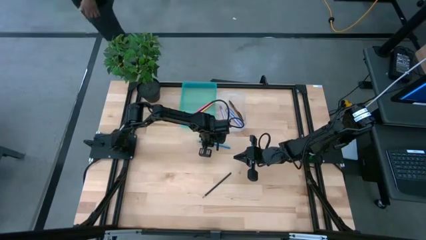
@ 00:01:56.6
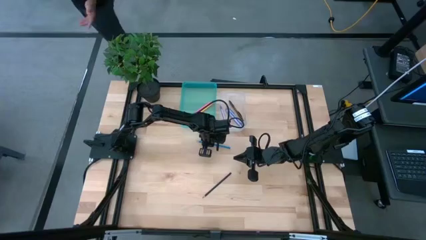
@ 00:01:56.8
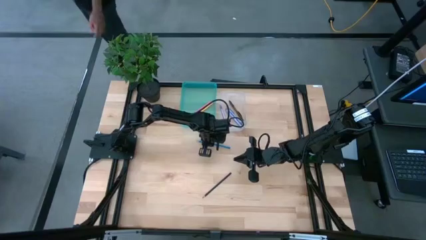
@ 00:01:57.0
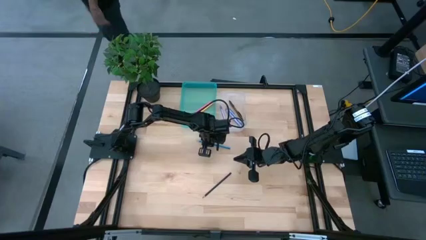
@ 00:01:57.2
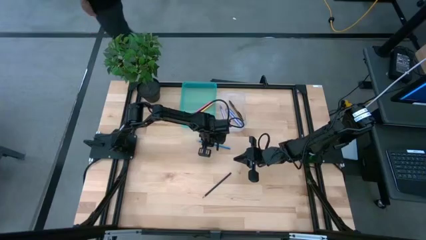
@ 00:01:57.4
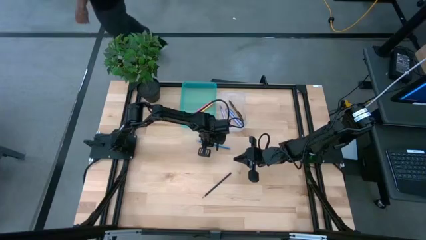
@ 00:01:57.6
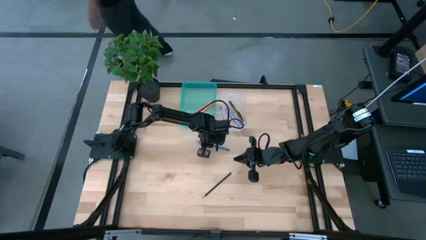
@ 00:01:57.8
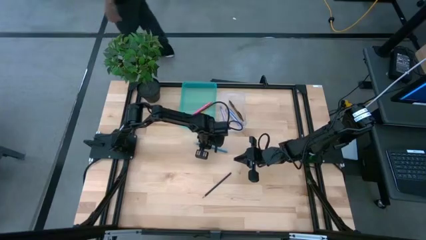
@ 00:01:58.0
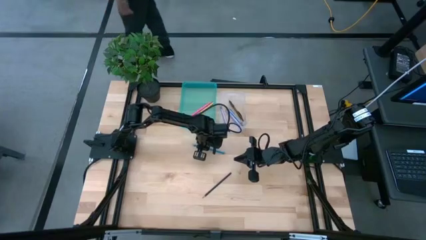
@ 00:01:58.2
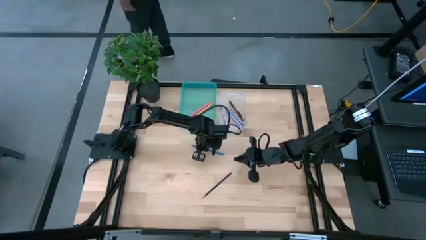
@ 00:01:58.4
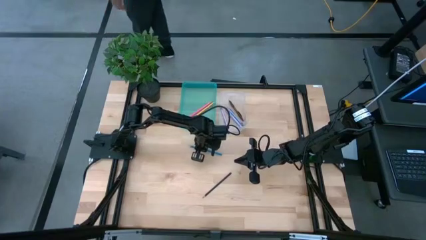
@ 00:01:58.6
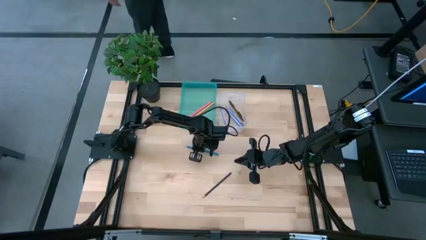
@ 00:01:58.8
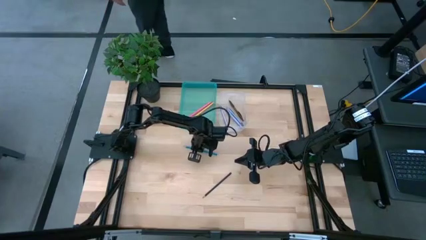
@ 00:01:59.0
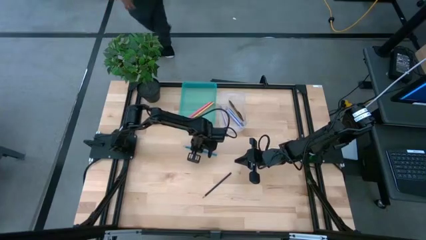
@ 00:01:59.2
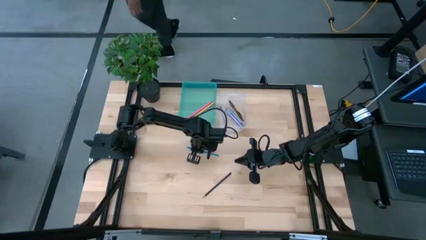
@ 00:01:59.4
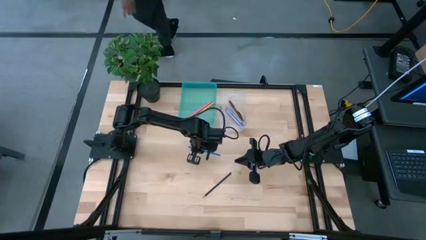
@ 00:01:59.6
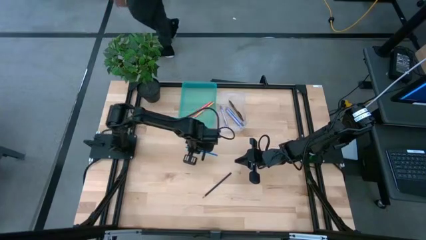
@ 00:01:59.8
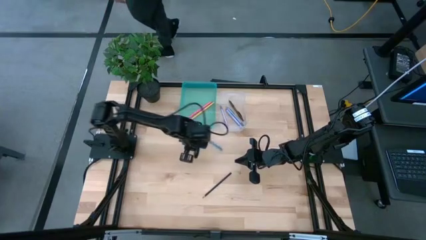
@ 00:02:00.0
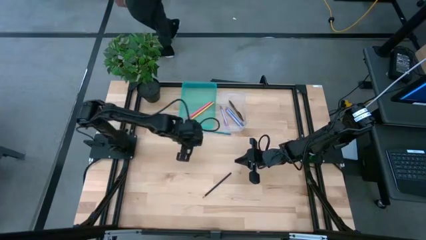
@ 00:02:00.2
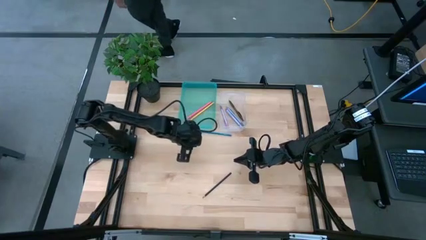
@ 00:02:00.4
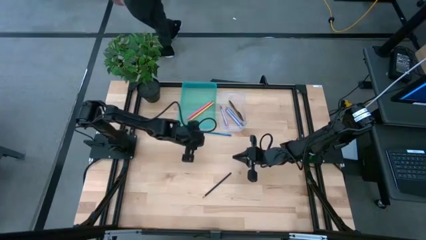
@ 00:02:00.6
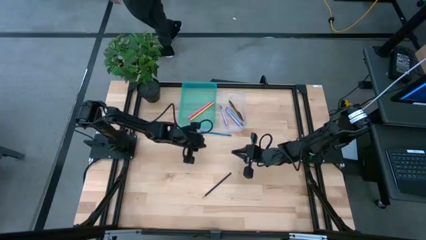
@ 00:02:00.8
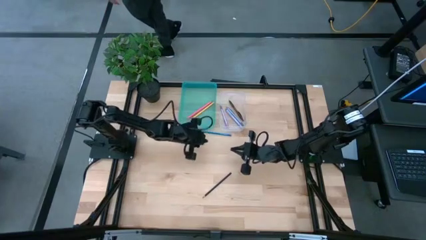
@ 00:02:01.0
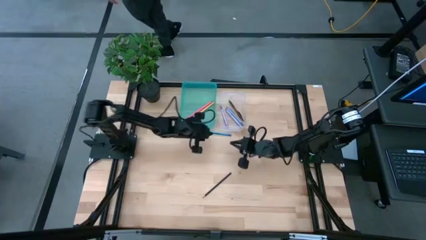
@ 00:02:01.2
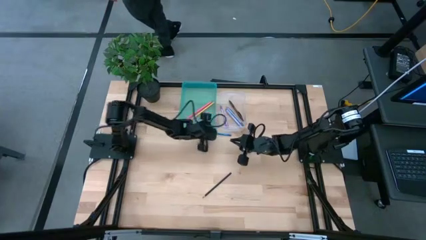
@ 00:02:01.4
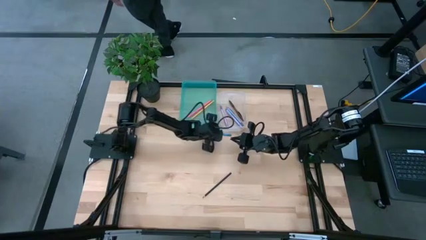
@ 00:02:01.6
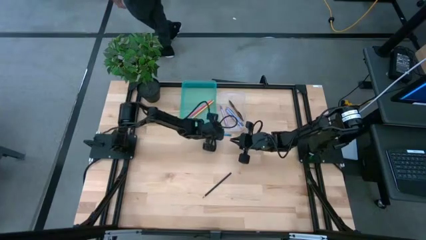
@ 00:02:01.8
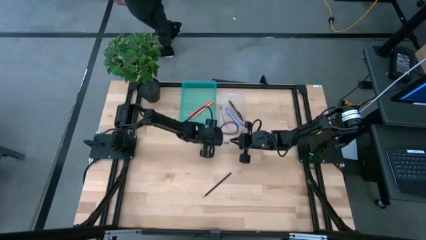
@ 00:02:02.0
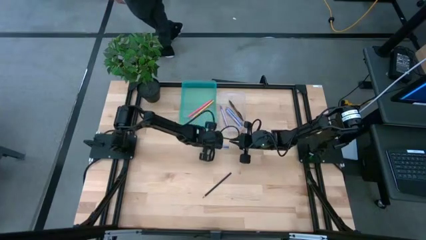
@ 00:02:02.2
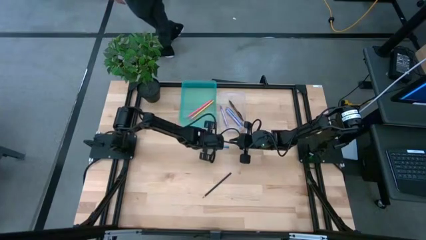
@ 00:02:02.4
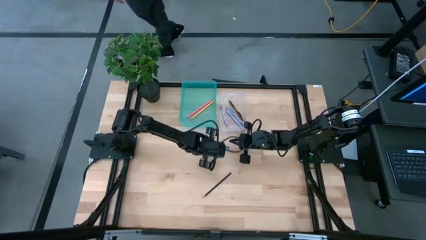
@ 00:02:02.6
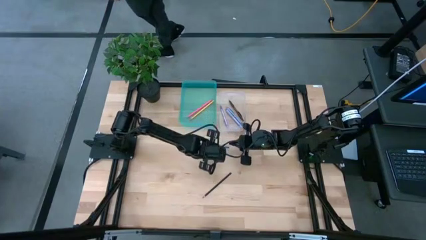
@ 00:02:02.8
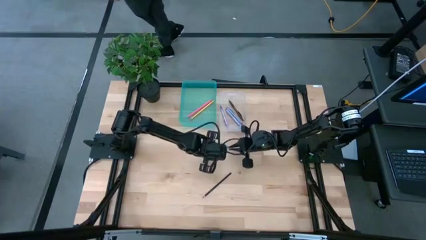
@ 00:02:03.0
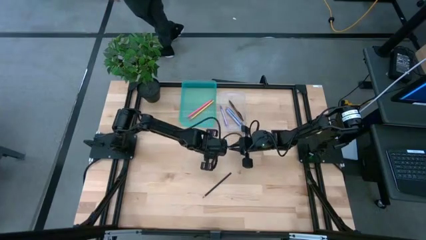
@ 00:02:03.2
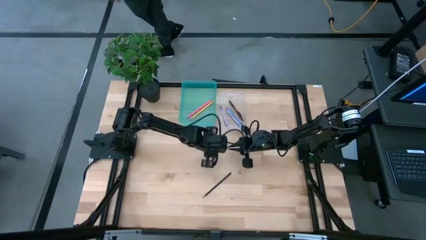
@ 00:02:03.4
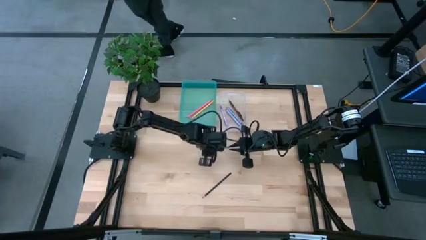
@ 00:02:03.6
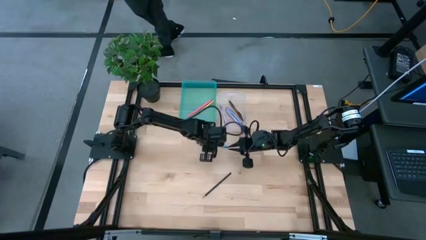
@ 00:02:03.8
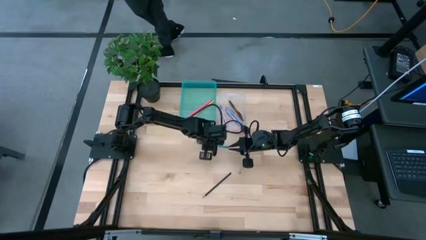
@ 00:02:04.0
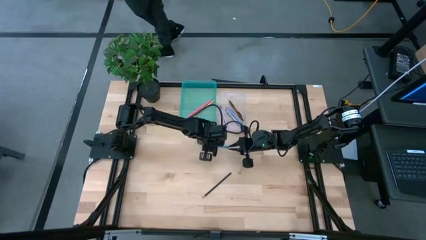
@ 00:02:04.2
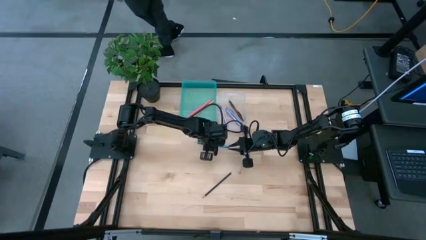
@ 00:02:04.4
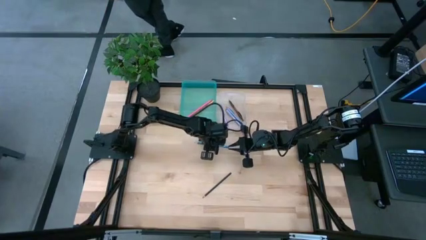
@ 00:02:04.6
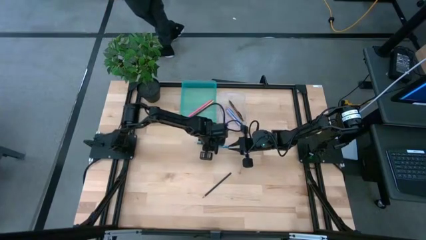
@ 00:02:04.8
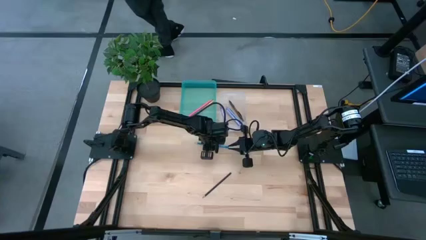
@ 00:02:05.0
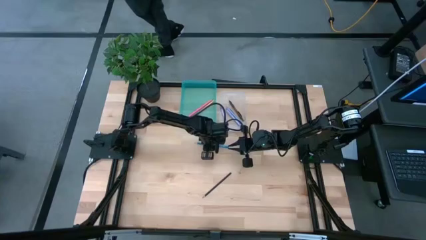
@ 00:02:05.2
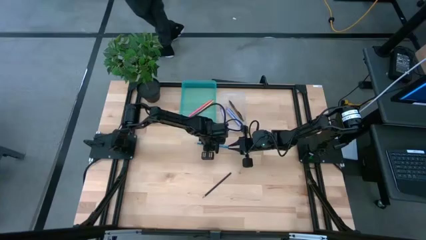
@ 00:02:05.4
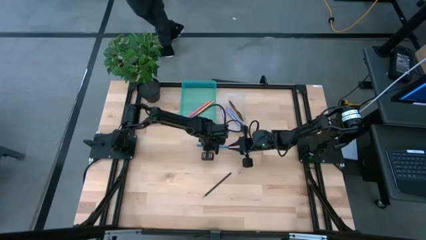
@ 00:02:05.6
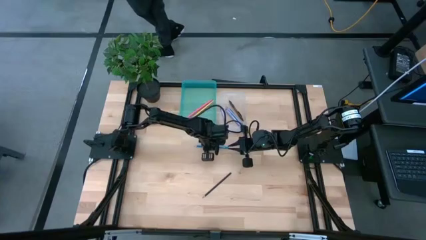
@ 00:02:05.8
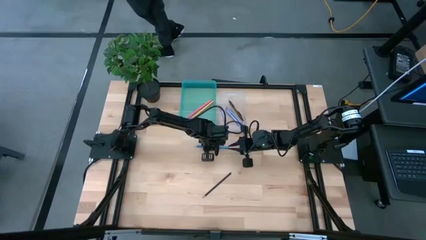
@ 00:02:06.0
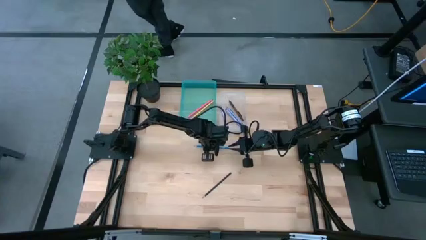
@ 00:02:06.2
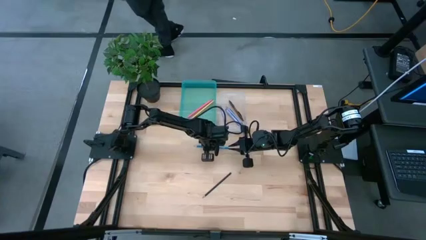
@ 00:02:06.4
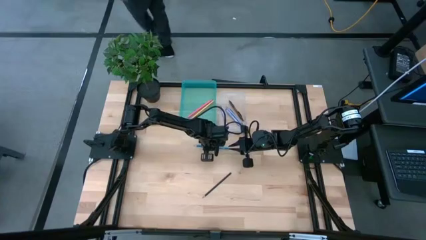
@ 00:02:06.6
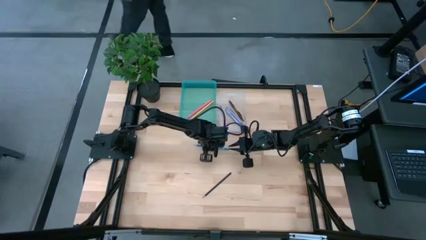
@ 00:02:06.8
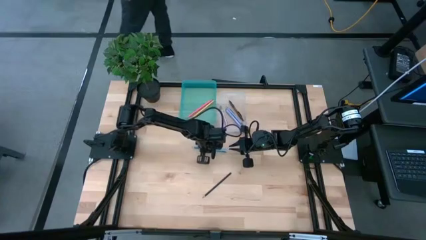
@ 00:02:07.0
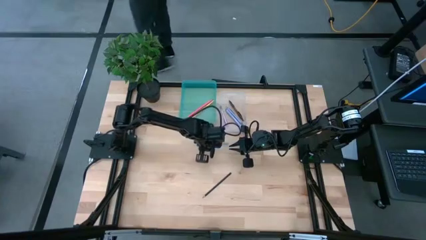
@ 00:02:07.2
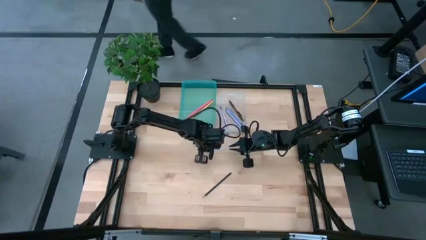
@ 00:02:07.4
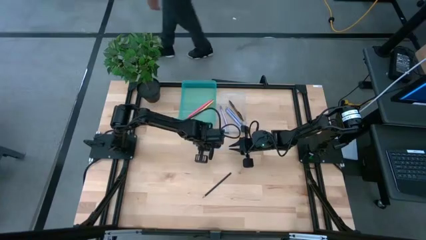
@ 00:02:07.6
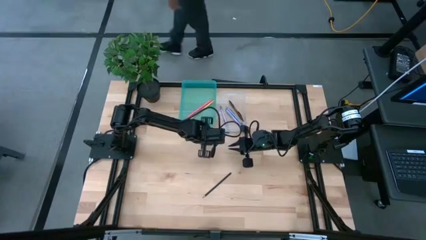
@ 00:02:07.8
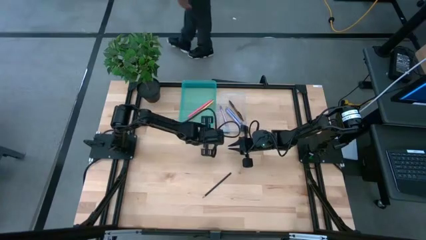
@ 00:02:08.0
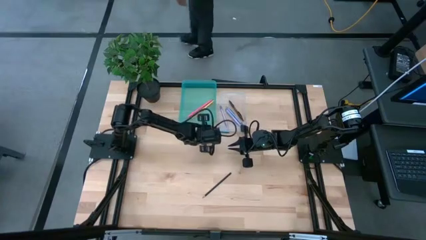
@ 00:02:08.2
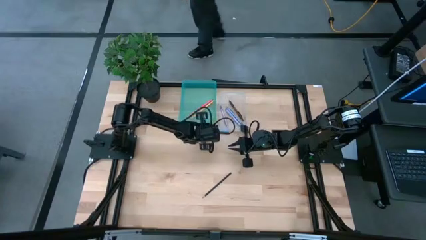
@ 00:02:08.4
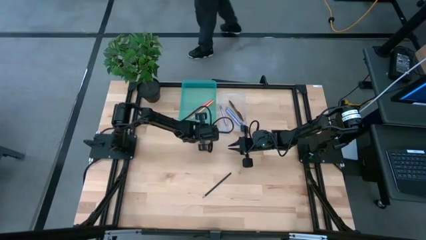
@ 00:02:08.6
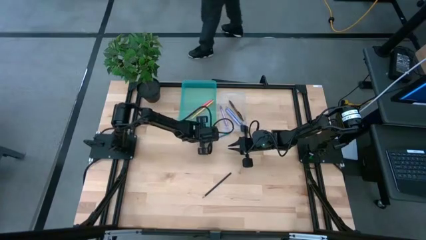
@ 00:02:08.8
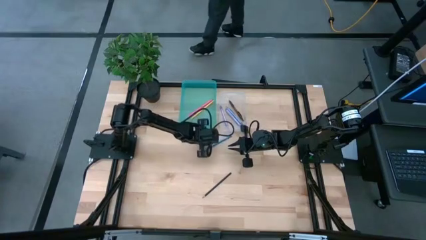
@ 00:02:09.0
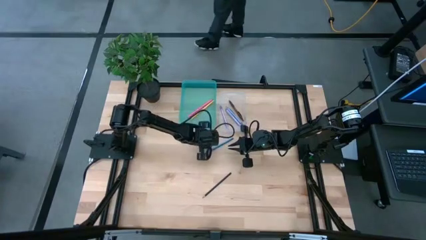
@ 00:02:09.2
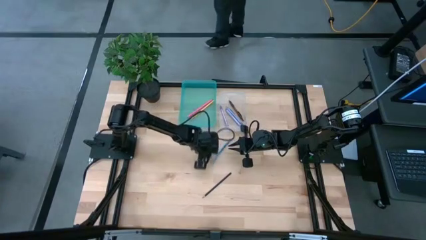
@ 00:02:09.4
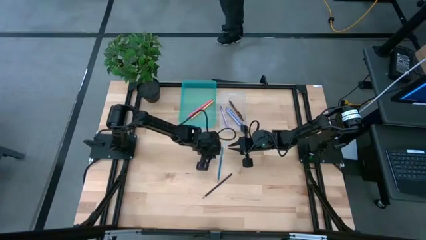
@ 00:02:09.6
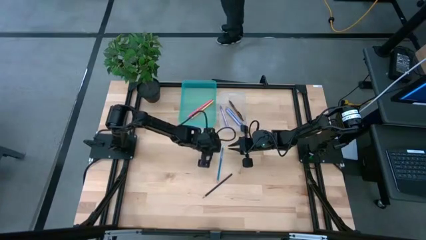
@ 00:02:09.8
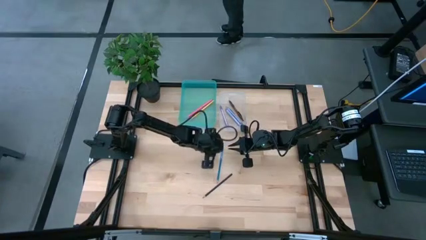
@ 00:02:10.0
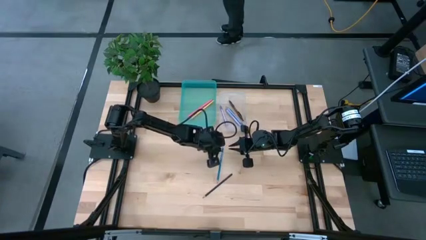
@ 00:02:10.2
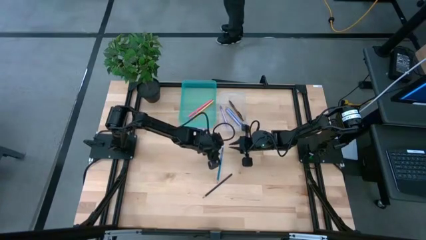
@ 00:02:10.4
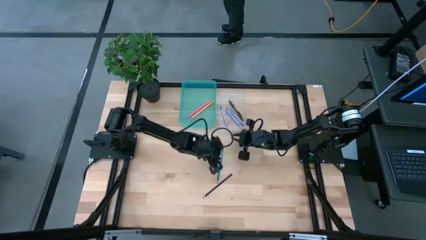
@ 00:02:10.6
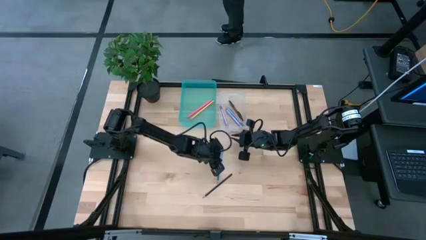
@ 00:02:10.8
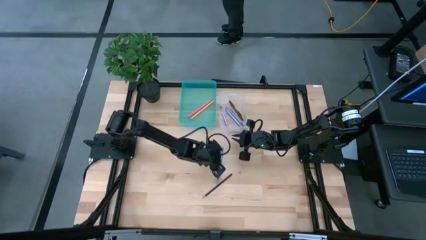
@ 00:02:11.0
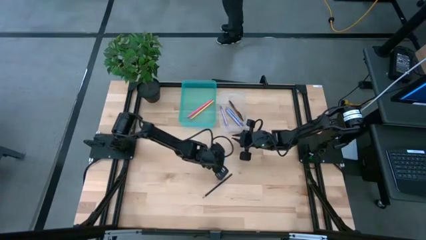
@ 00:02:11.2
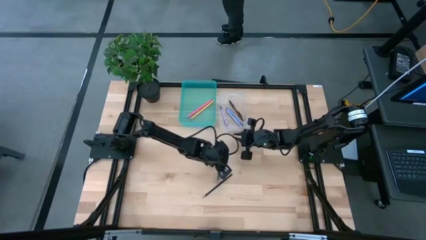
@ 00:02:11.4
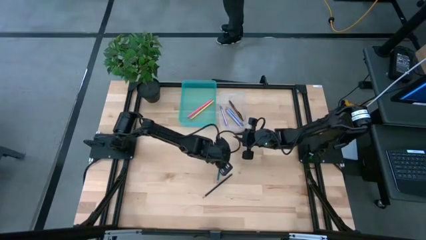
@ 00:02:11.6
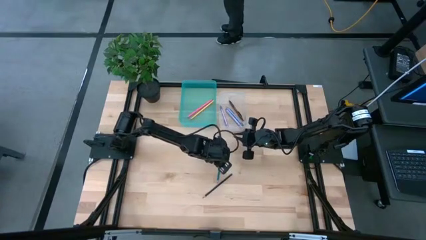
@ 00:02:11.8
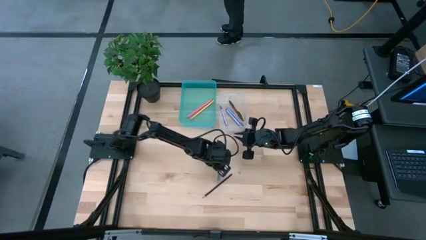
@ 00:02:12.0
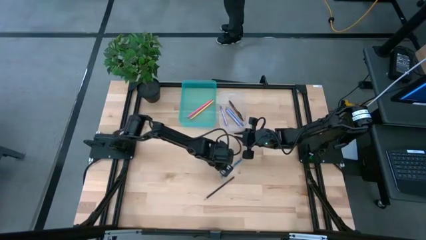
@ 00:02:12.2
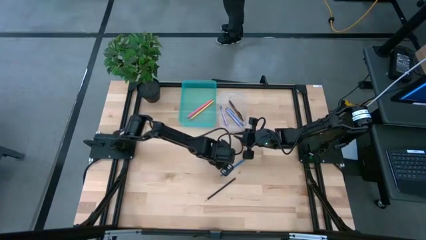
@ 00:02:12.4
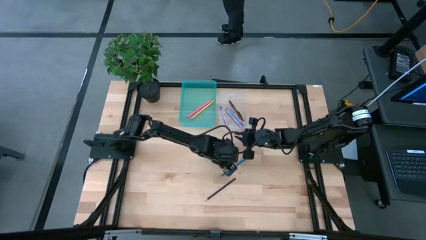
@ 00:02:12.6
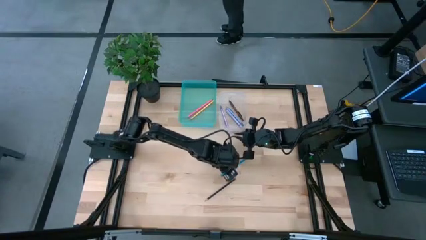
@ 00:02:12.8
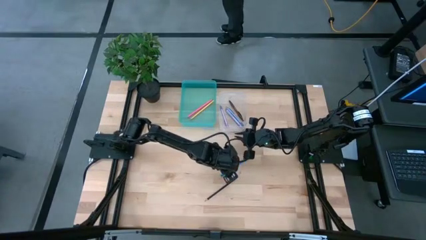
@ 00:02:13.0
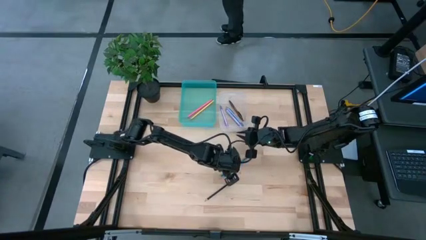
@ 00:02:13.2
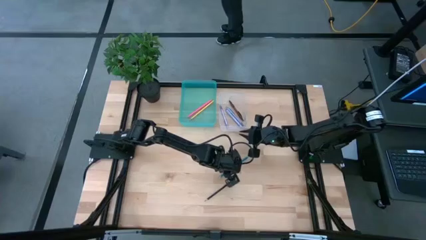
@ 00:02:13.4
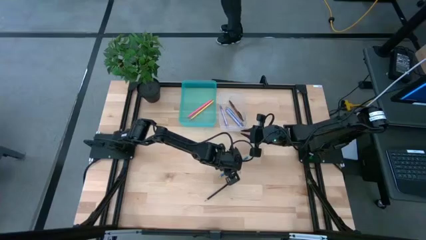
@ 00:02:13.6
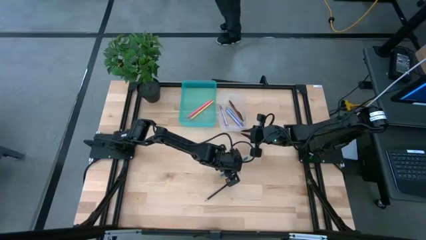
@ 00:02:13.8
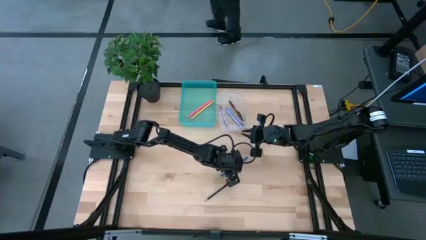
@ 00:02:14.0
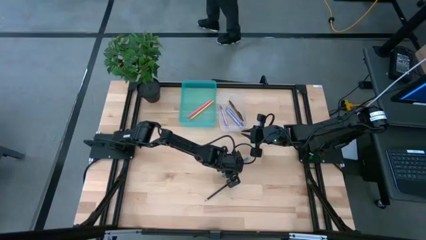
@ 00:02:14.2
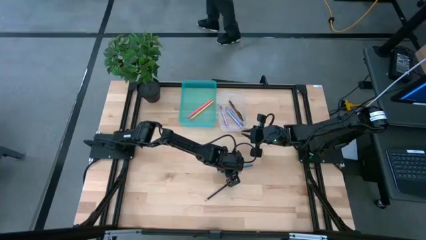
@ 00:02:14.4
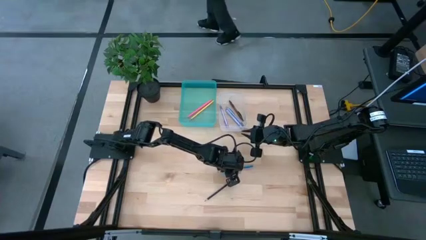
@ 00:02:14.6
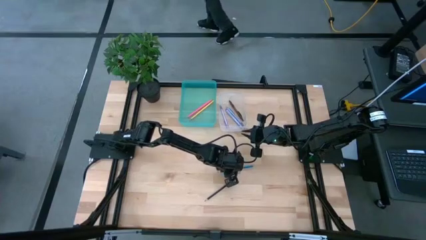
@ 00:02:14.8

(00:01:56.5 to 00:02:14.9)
Task: Sort pens & pencils
Put the blue pencil into the blue bin
